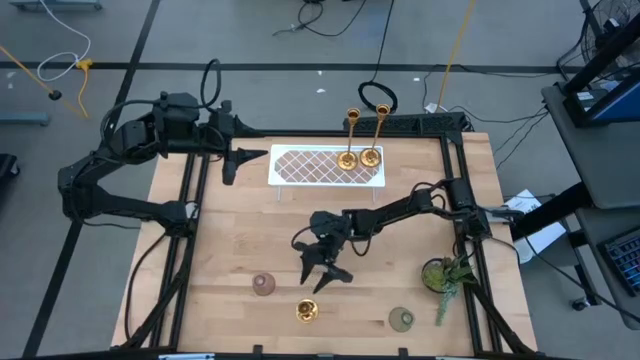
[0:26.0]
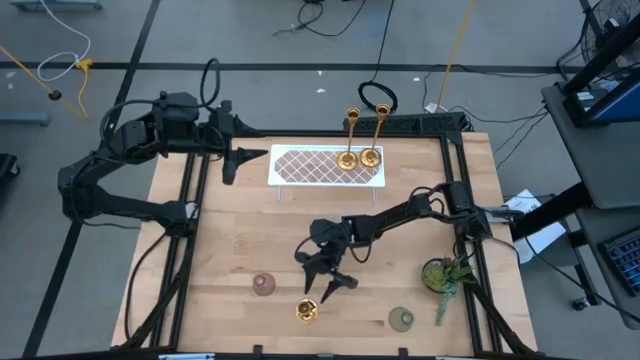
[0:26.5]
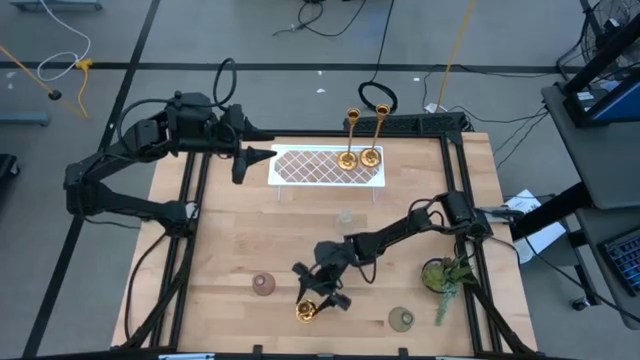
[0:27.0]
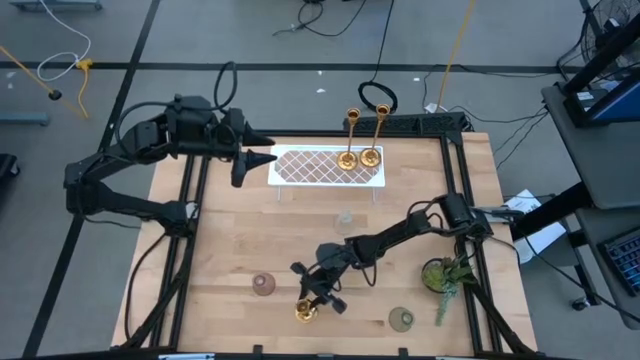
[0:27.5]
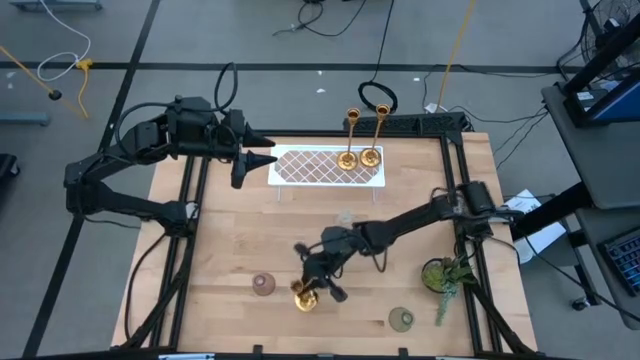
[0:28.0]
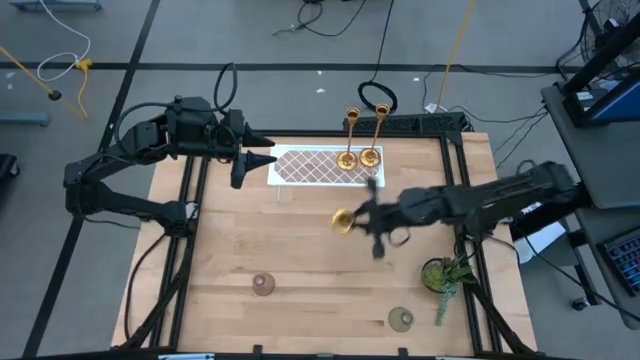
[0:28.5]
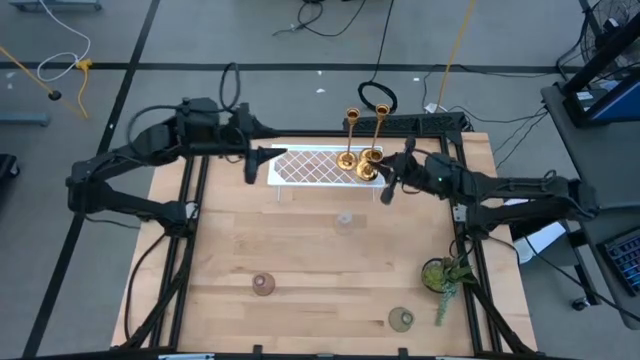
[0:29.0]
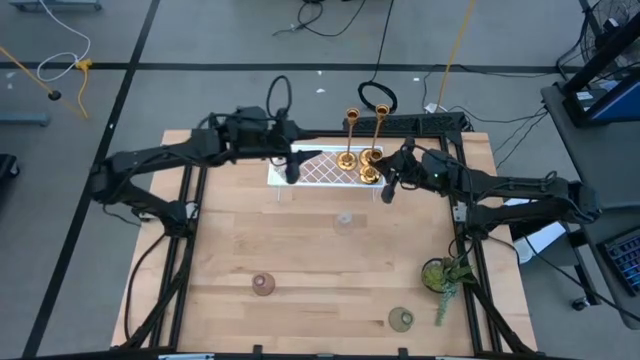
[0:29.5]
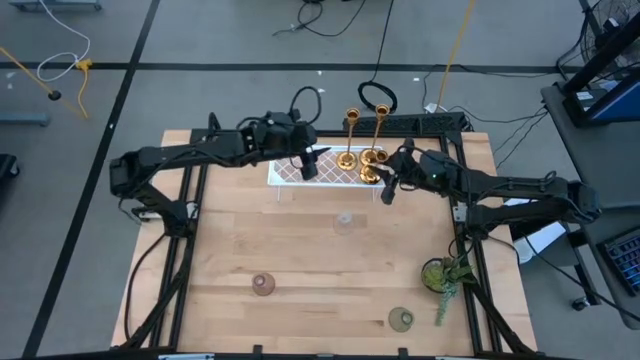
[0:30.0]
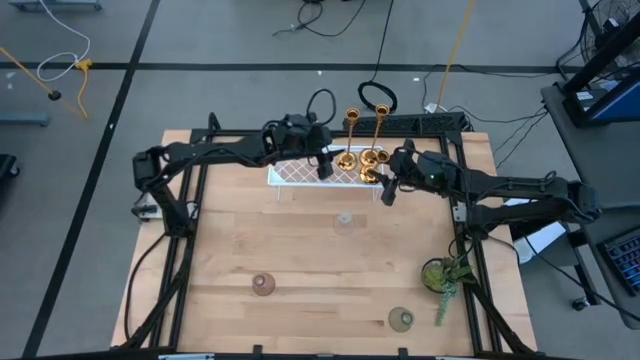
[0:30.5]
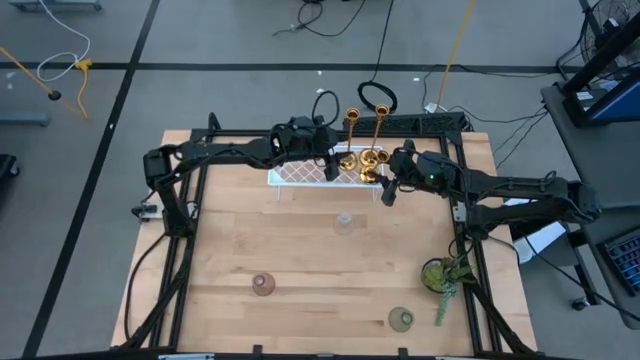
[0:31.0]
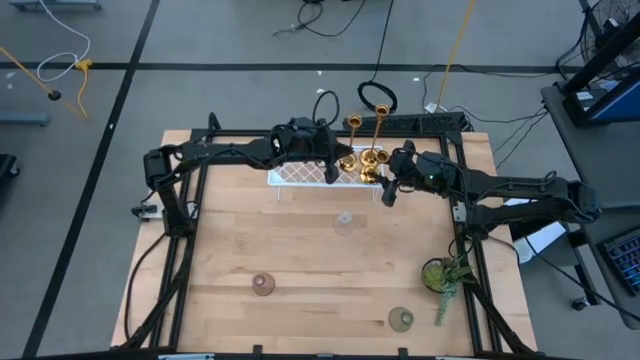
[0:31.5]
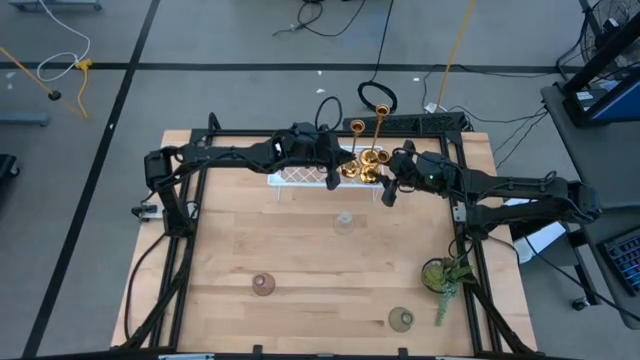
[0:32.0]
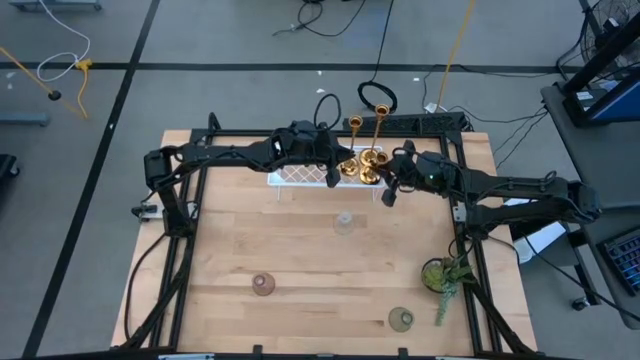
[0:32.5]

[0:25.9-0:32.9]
Task: Pick & Place candle stick holders
Put the gold candle holder on the shelf

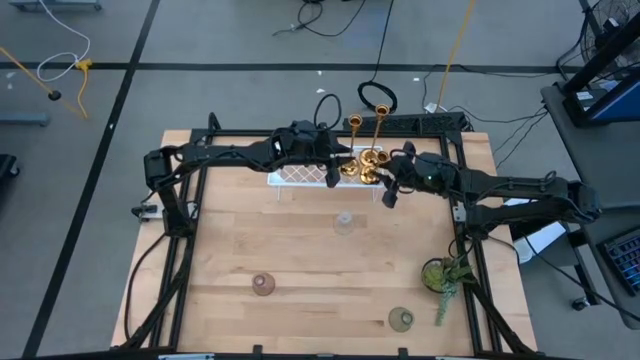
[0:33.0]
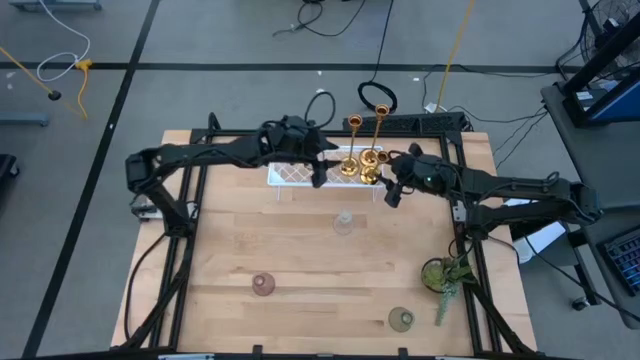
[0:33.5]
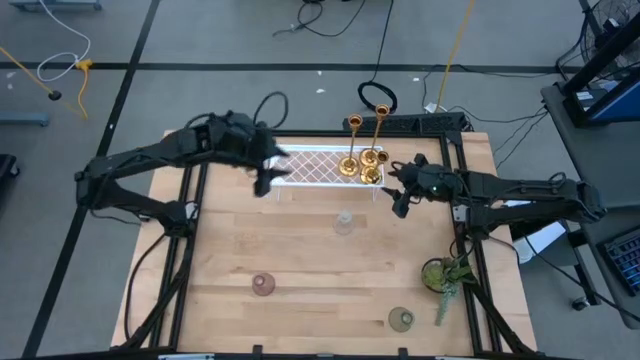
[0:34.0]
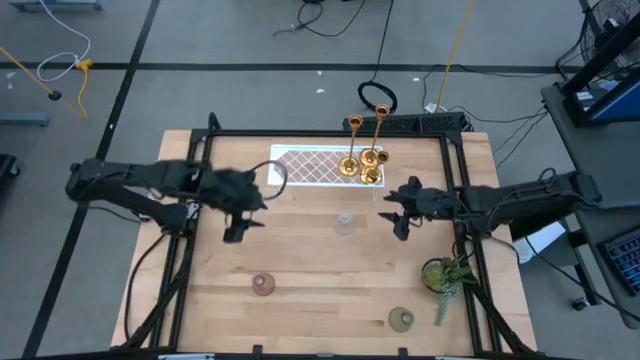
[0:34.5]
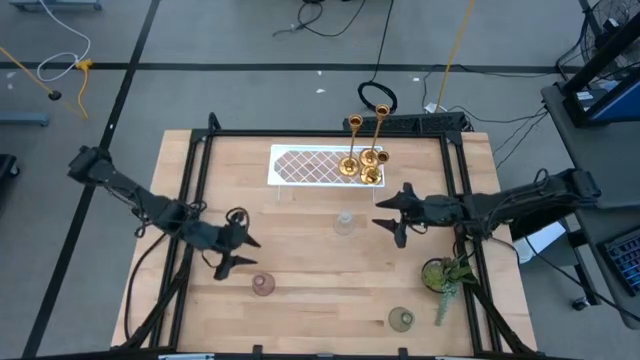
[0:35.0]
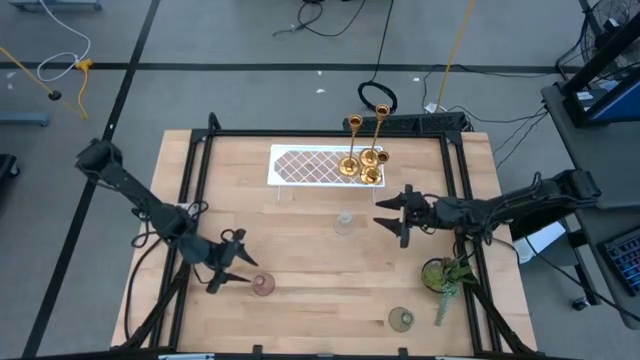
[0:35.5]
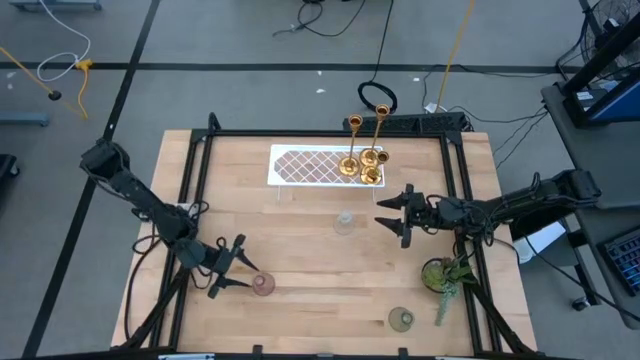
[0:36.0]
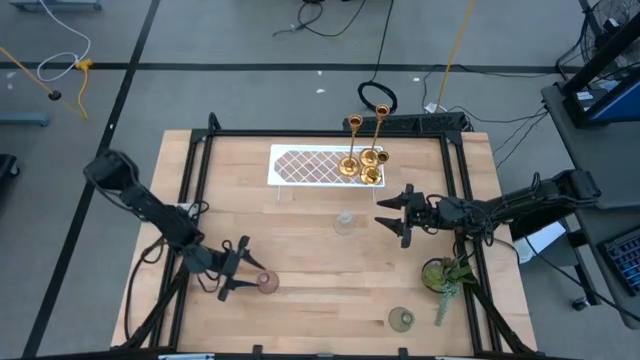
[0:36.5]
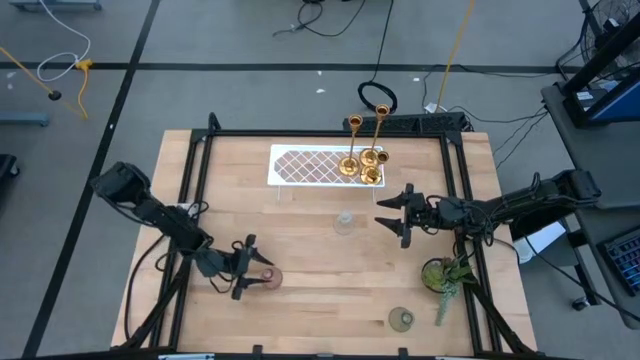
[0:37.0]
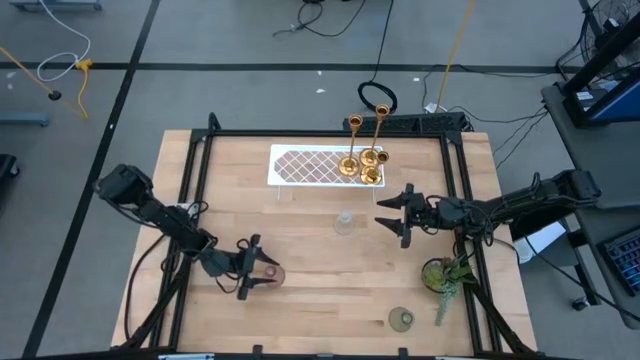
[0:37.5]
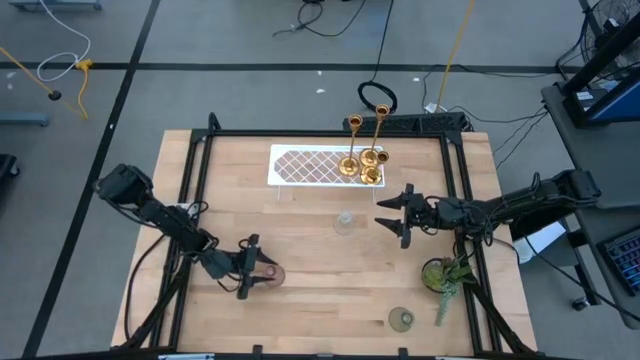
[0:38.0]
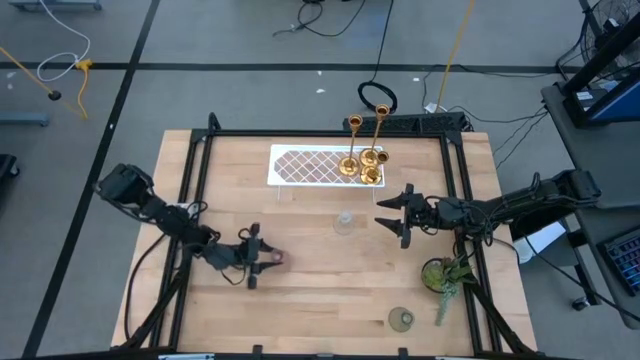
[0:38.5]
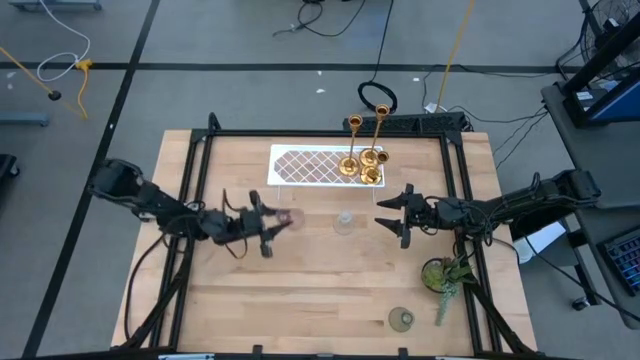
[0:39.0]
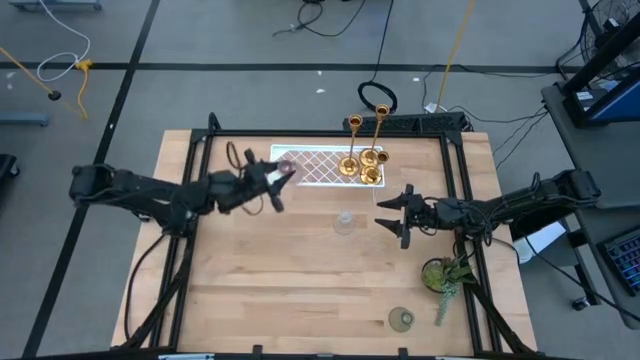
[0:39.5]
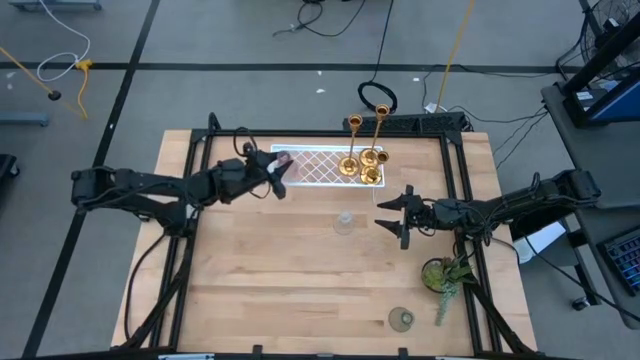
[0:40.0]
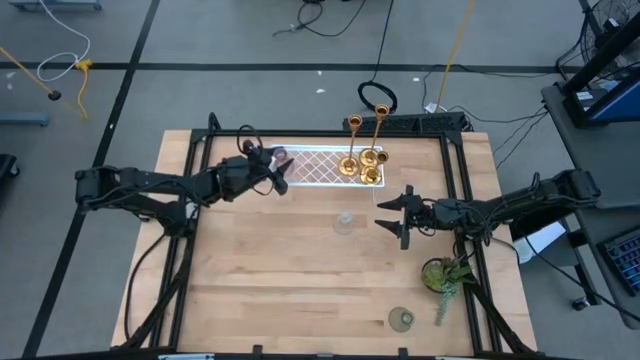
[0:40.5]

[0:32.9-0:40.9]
Put the purple glass candle holder on the shelf

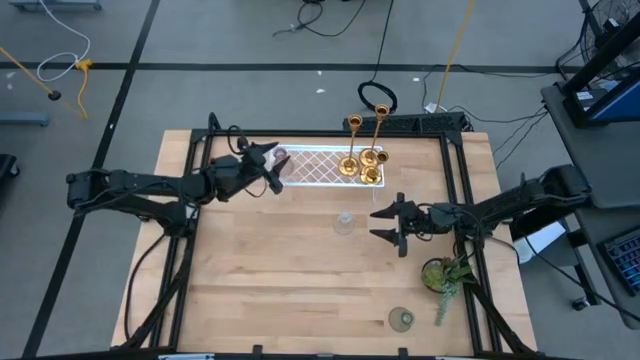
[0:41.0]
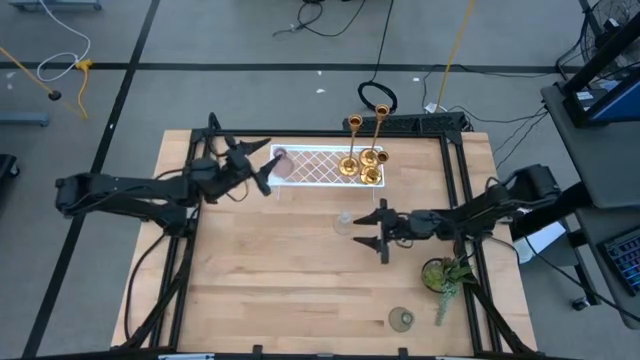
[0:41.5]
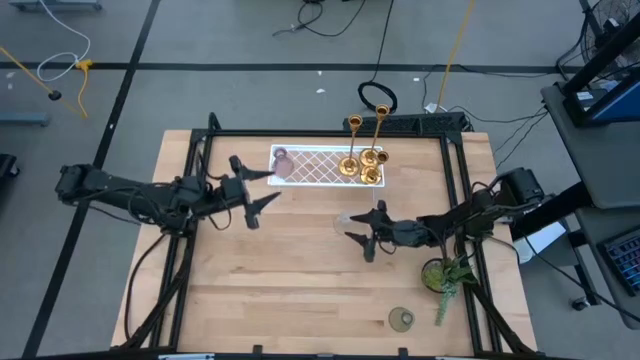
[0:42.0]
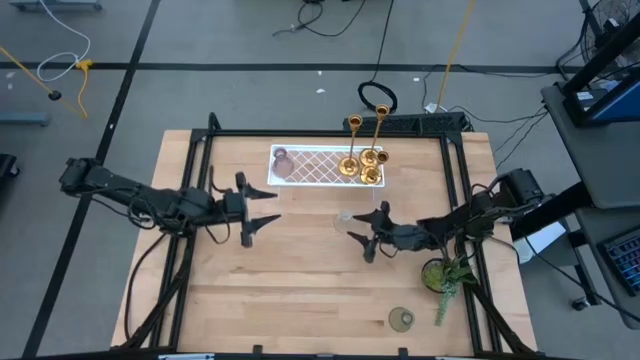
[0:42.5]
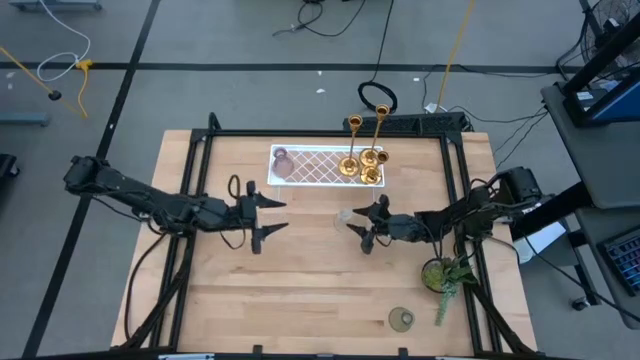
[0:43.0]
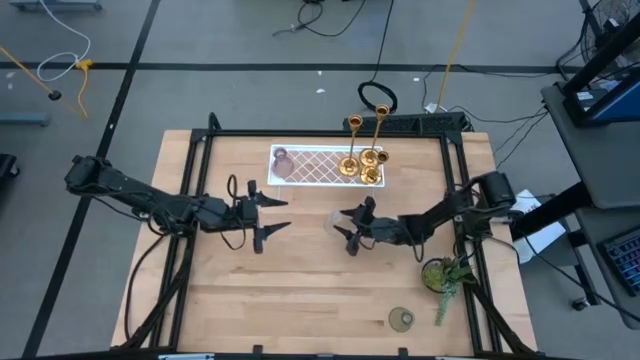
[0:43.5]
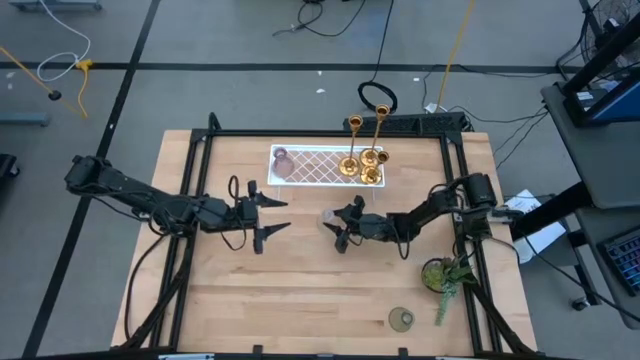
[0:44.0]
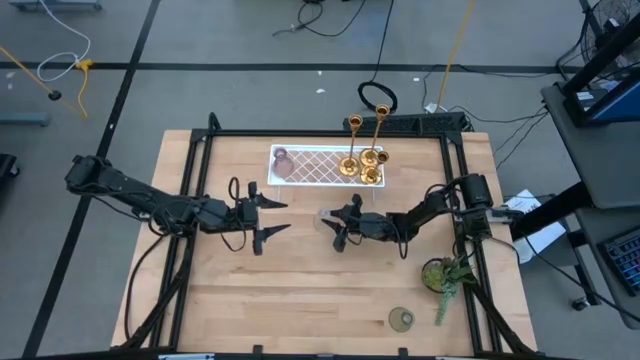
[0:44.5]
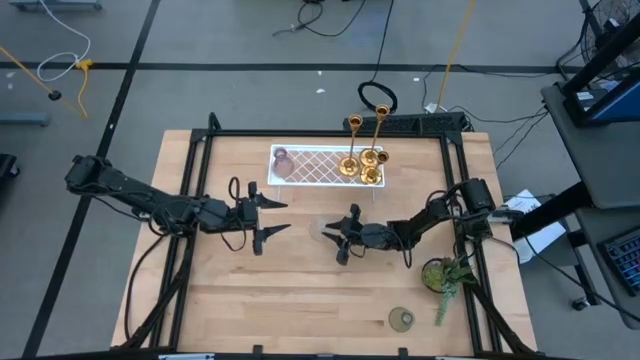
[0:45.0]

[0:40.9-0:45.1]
Put the transparent glass candle holder on the shelf

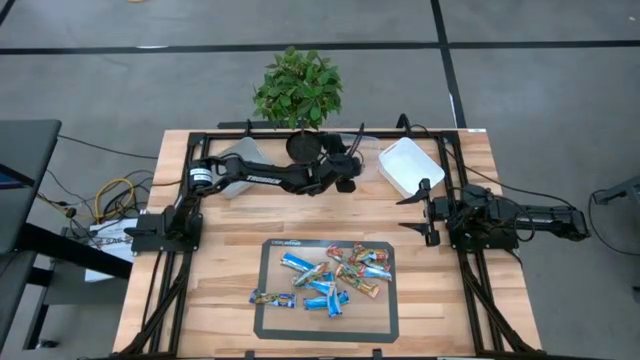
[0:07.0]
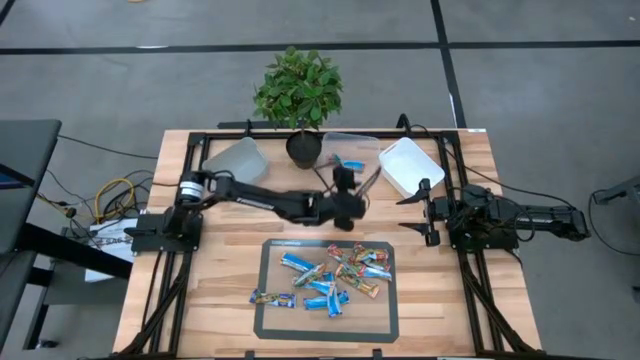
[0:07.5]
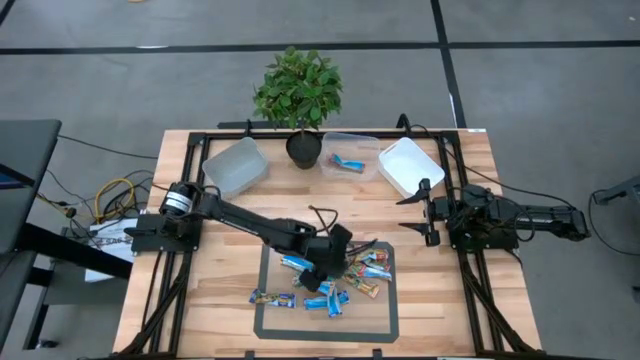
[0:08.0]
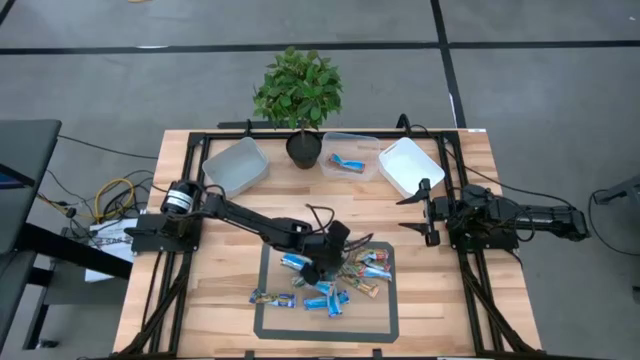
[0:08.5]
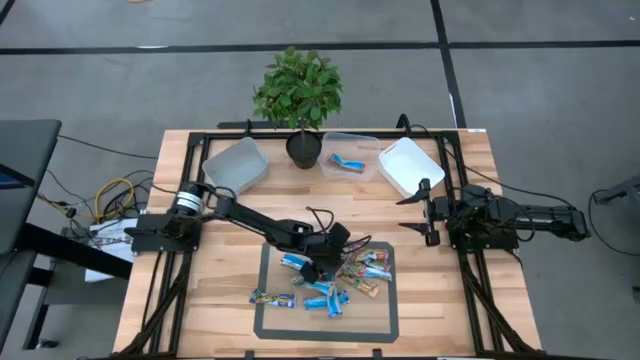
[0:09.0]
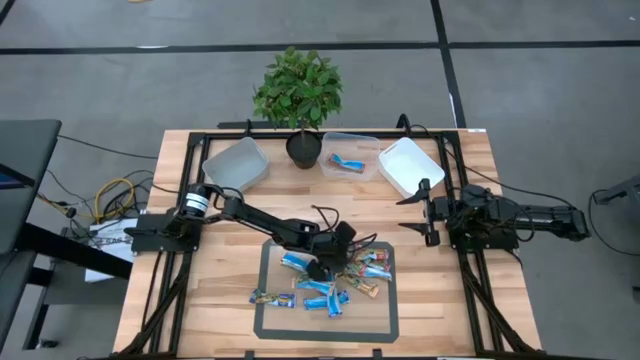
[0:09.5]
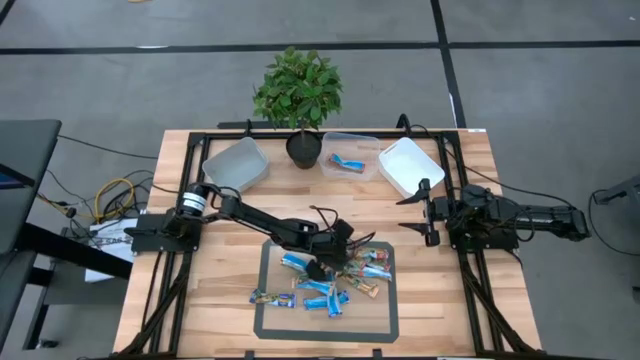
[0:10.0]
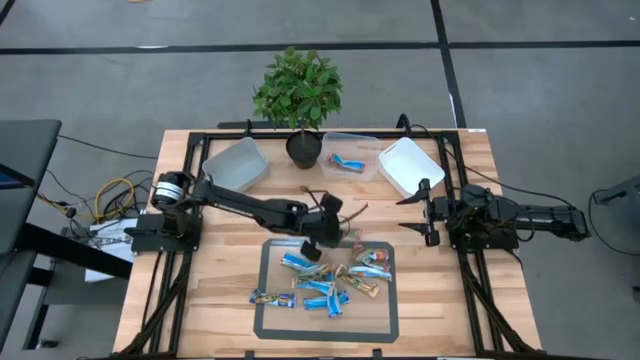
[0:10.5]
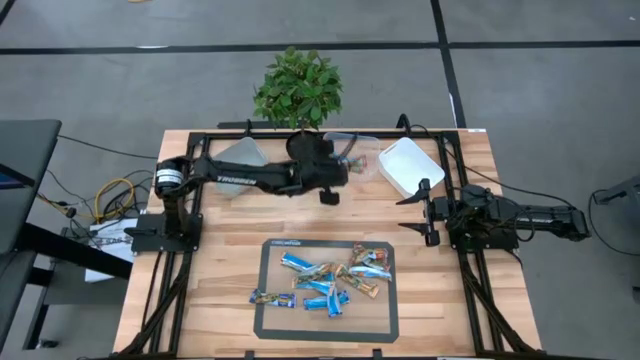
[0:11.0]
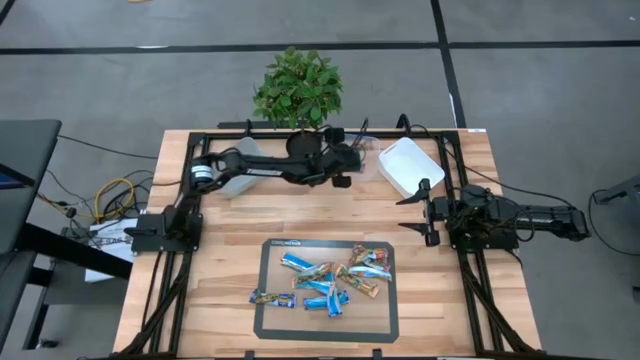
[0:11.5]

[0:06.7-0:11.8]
Task: Pick and place Granola Bars by type
Put the red granola bar into the transparent bin
